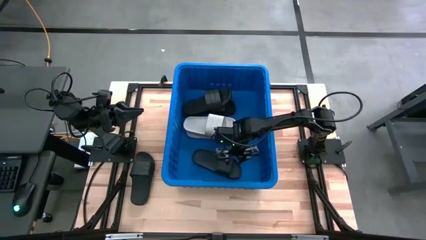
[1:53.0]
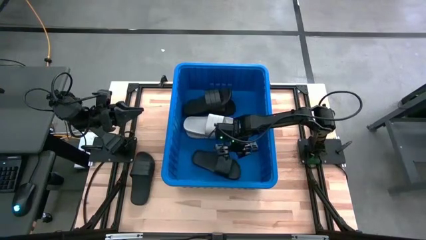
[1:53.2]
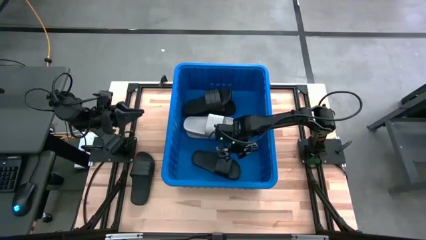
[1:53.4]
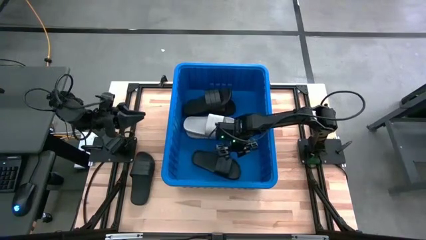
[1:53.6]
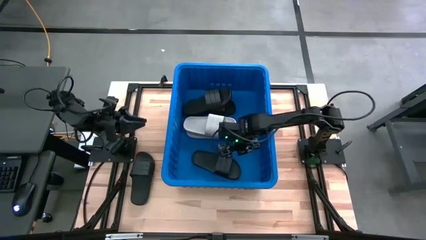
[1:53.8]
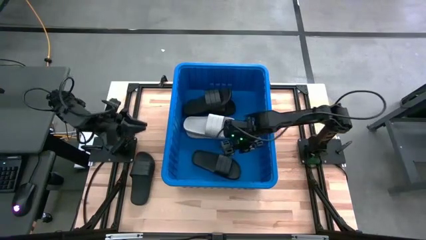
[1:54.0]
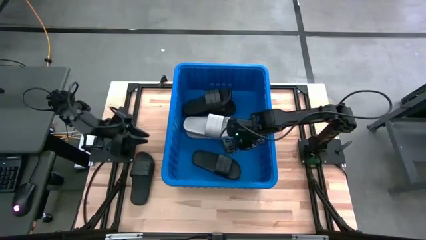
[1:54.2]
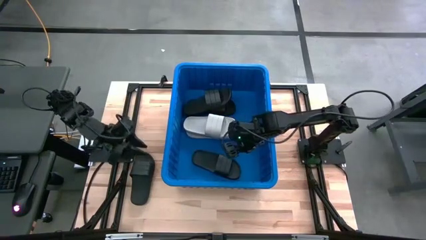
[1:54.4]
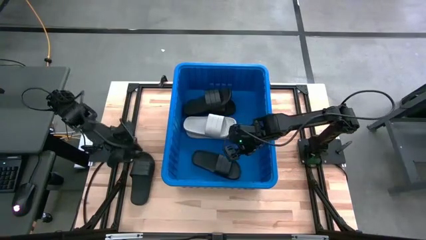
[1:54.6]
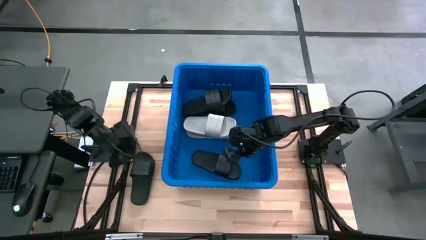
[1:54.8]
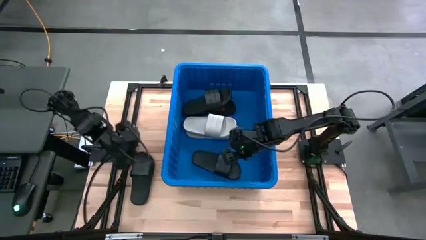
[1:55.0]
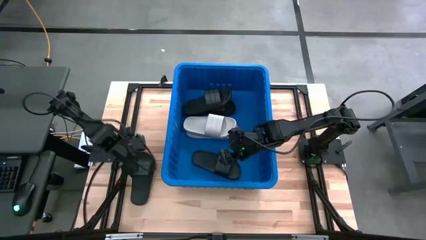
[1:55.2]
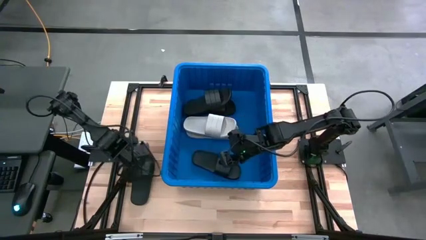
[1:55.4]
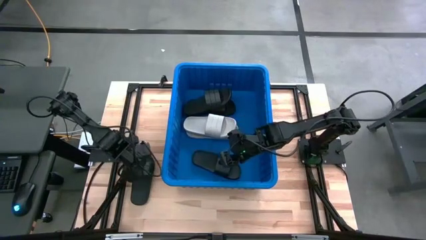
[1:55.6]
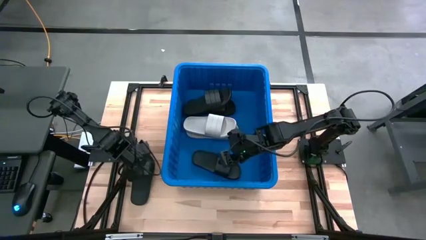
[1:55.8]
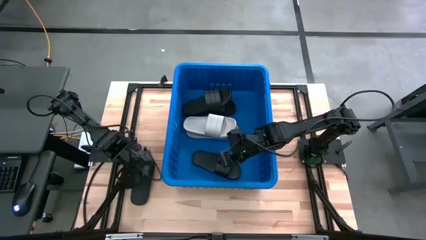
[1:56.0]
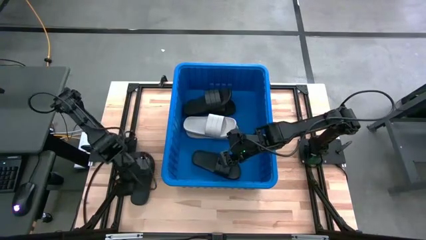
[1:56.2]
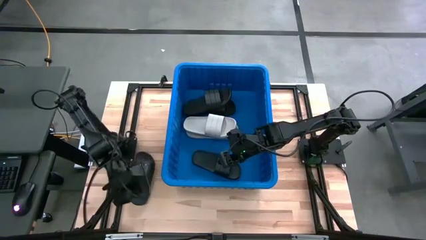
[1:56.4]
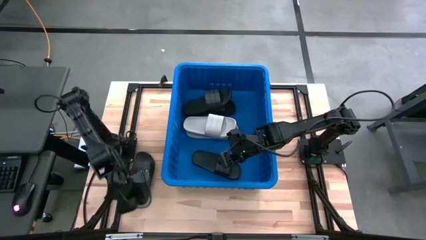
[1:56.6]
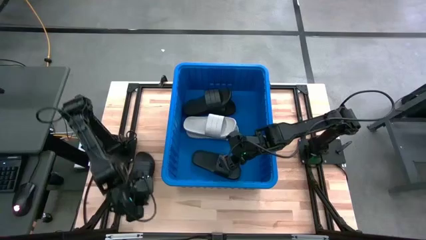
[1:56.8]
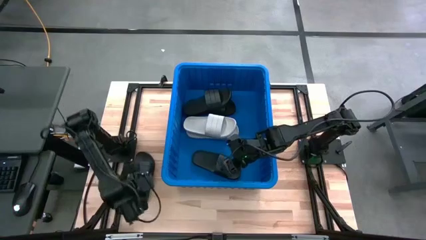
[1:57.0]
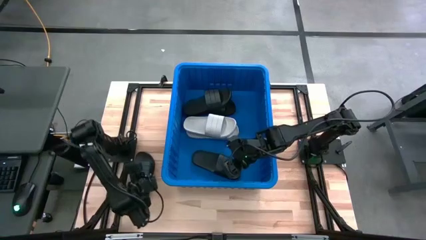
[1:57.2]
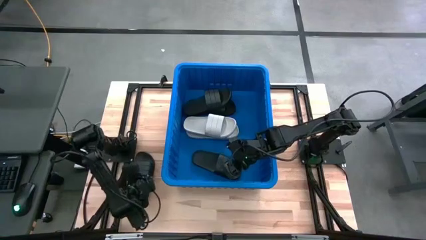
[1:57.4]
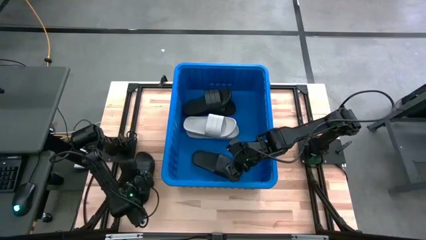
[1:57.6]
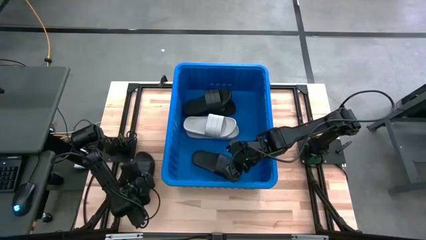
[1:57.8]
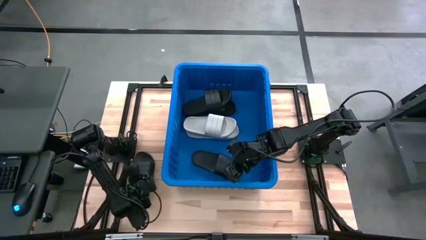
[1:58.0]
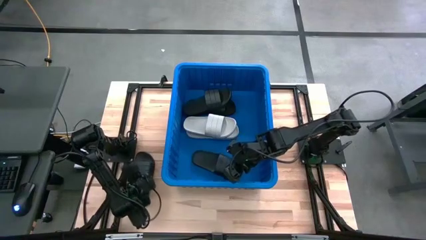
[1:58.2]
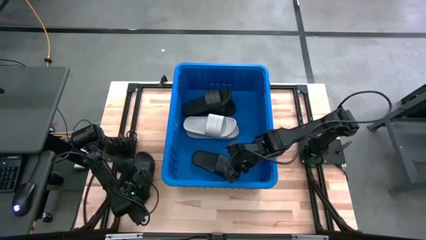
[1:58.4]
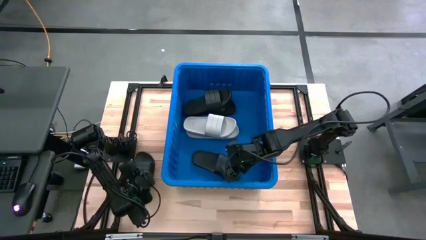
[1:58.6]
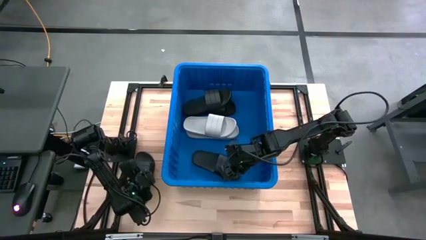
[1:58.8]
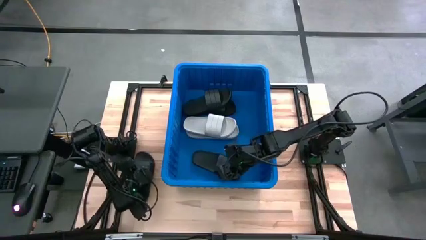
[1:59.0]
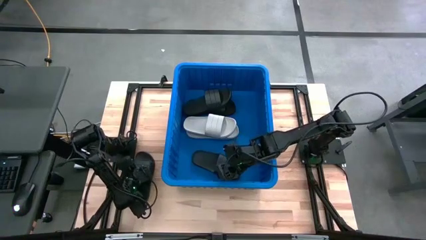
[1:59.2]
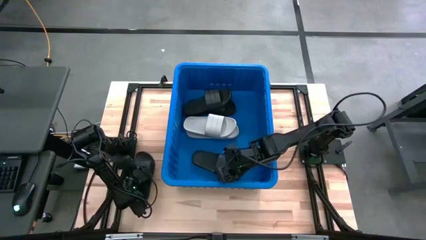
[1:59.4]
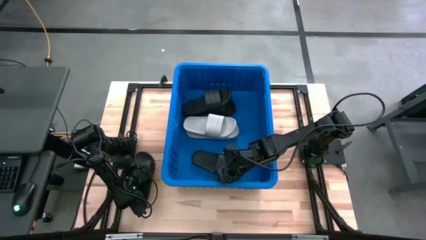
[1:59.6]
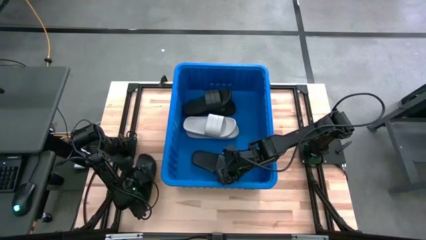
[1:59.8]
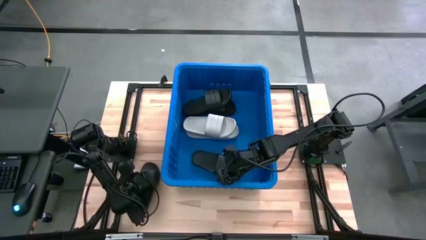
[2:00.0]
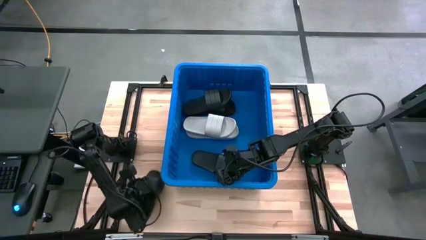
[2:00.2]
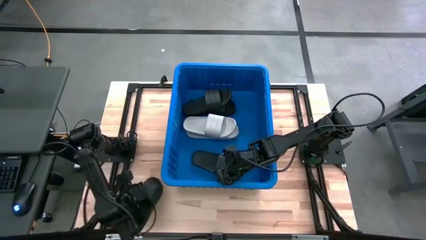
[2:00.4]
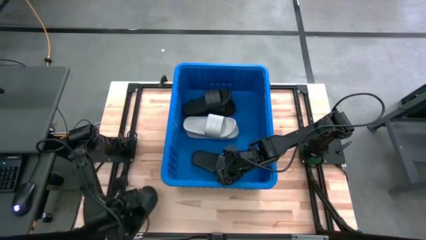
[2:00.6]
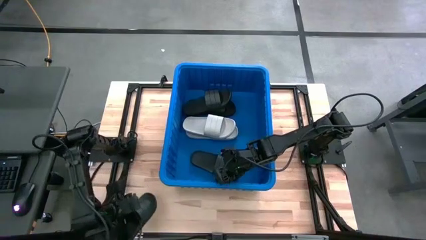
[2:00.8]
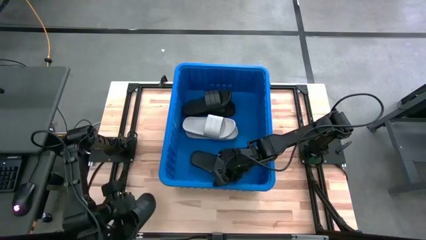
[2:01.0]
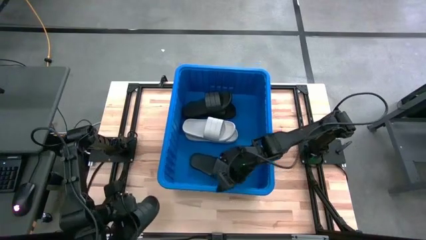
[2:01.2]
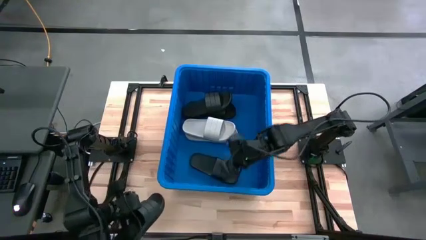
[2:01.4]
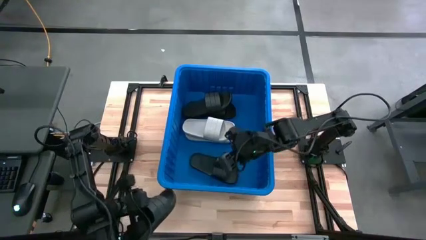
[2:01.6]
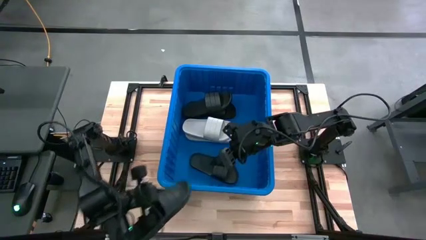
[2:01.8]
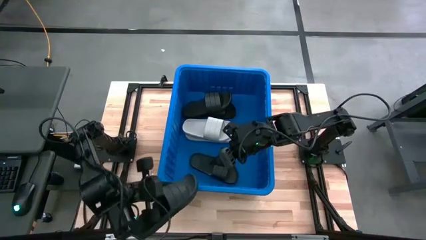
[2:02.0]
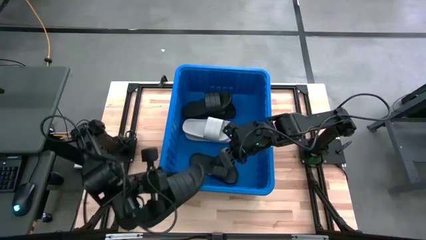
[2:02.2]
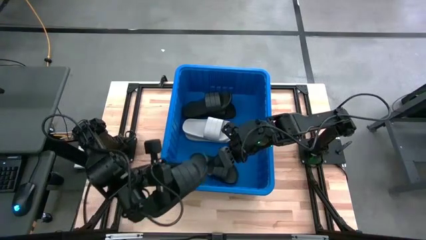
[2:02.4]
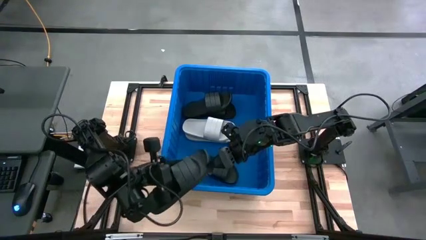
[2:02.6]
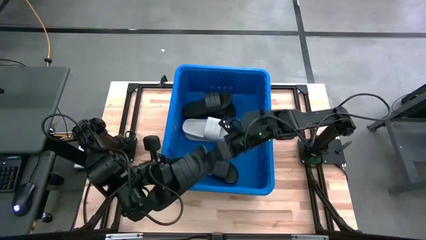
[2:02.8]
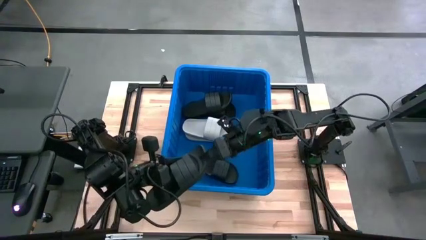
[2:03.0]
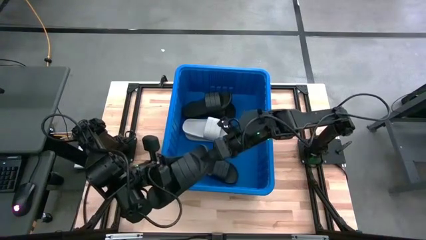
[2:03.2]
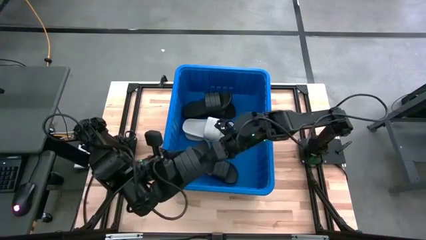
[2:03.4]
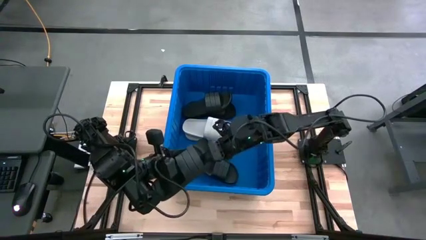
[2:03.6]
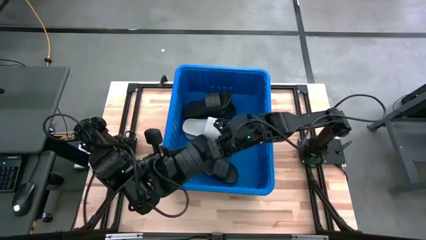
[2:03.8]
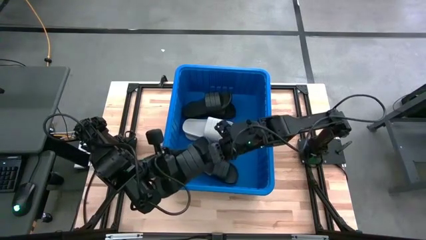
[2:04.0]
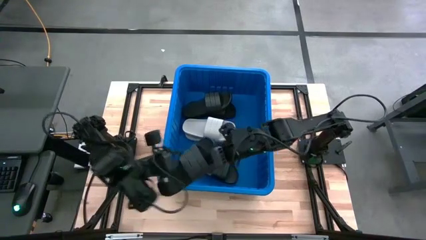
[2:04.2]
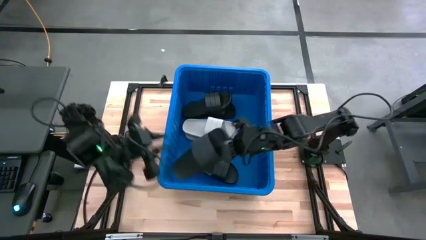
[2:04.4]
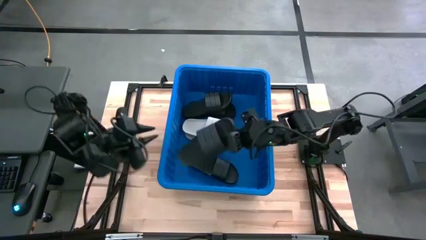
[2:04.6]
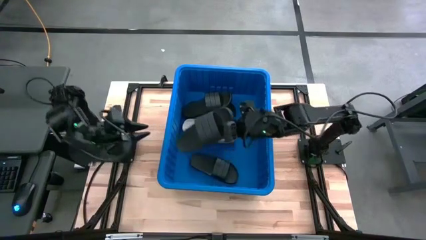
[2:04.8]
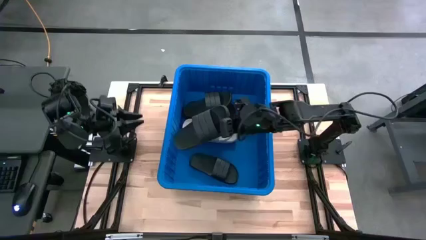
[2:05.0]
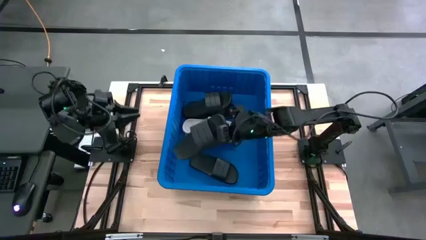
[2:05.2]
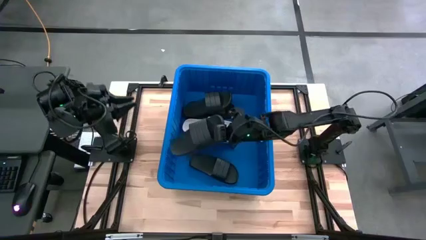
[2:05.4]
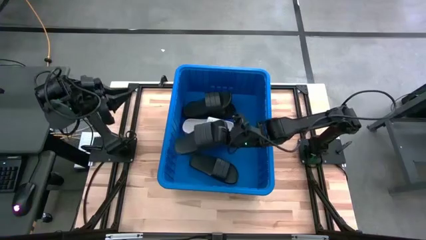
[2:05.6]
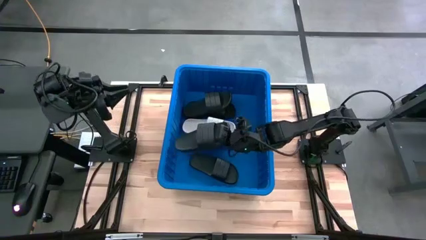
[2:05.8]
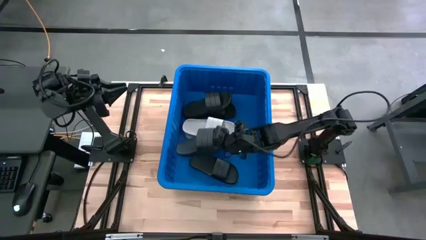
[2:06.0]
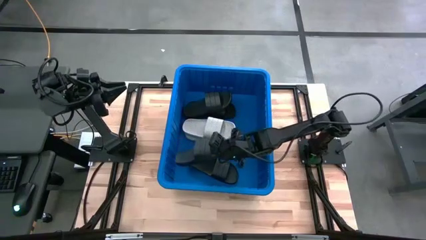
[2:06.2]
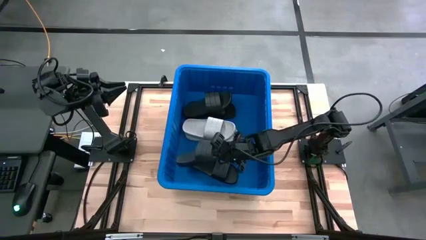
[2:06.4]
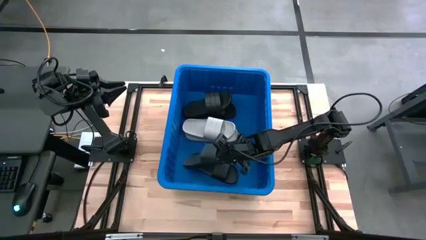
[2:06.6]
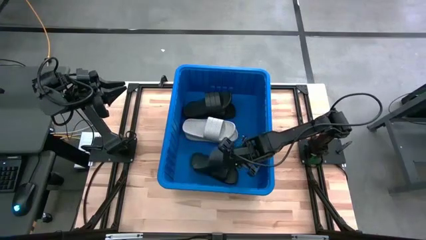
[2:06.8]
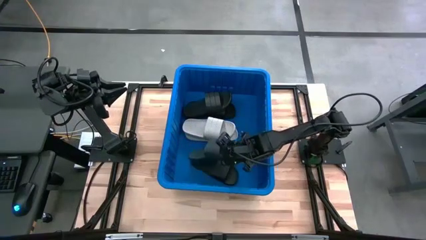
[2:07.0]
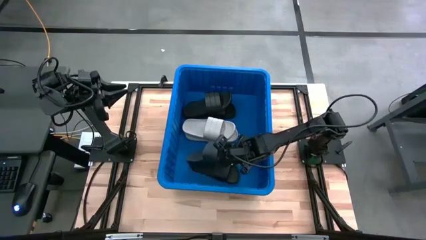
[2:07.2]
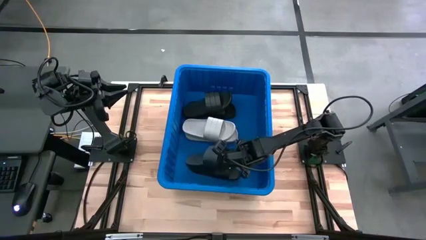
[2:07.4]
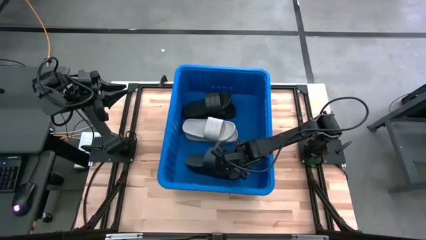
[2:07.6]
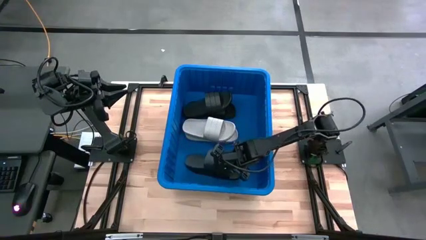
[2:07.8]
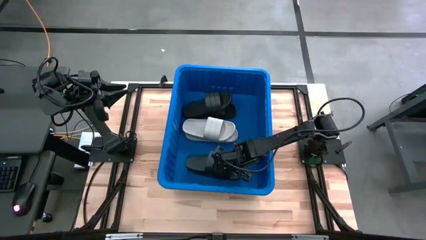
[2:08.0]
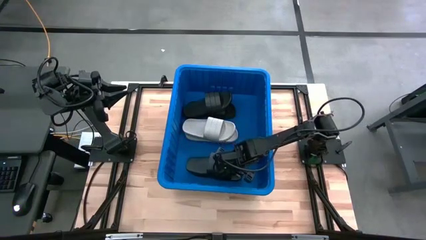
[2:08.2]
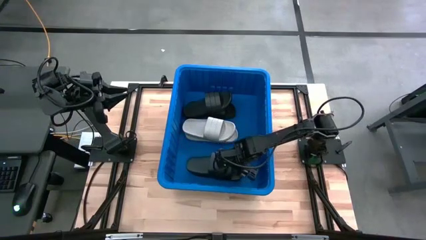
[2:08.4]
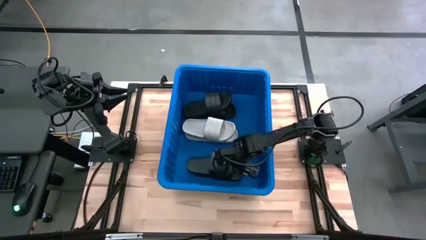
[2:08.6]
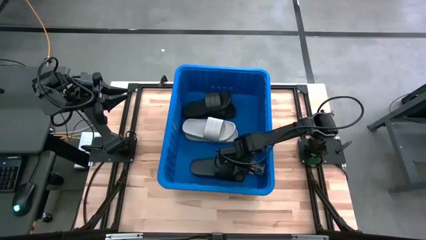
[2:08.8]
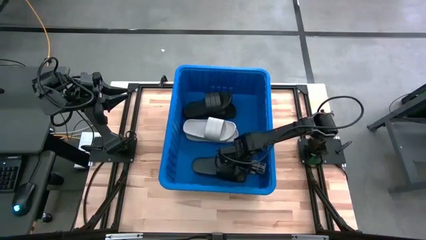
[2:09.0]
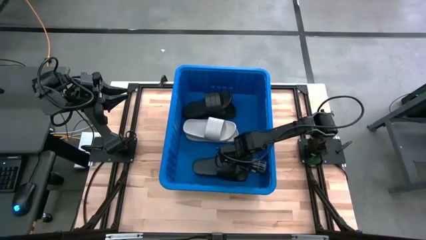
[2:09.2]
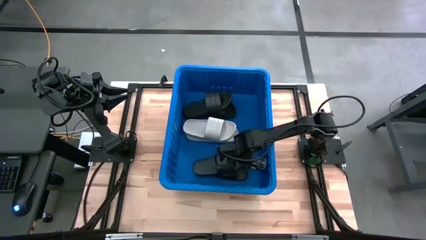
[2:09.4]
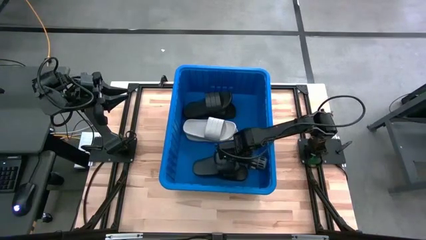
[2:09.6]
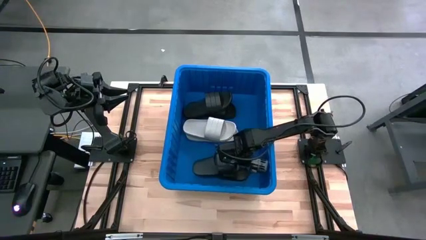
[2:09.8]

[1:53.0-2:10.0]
Task: Pick and place slides into bin
Put the black slipper into the bin
